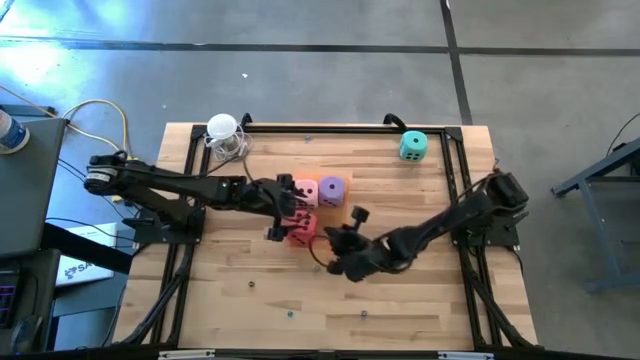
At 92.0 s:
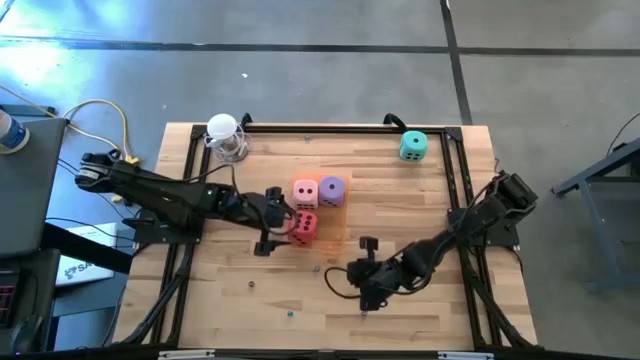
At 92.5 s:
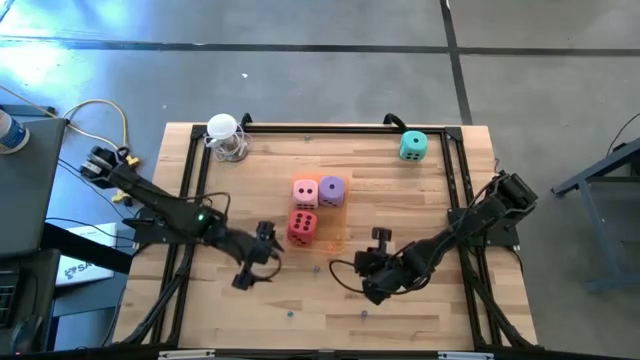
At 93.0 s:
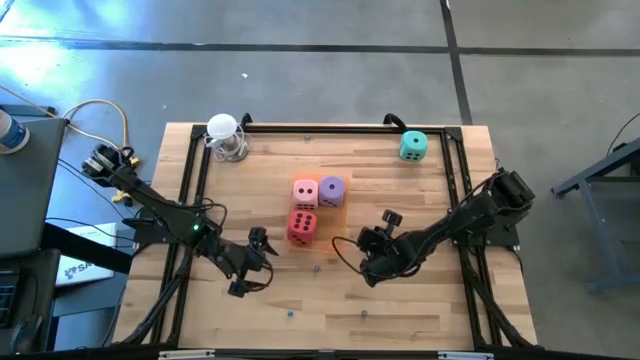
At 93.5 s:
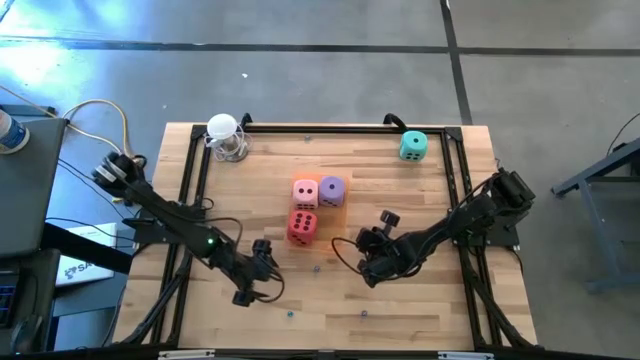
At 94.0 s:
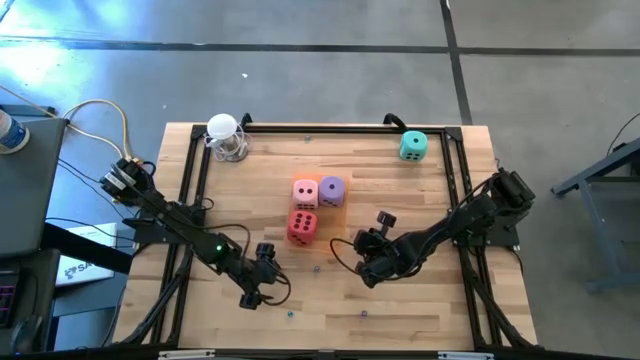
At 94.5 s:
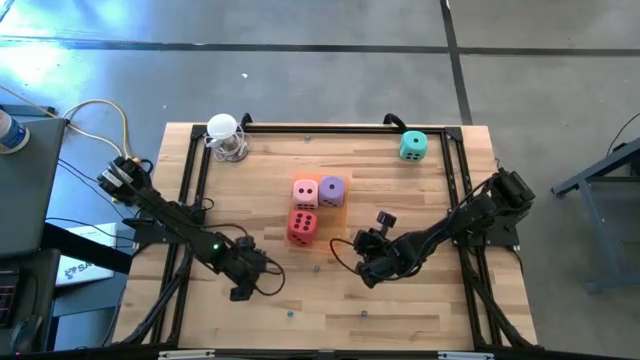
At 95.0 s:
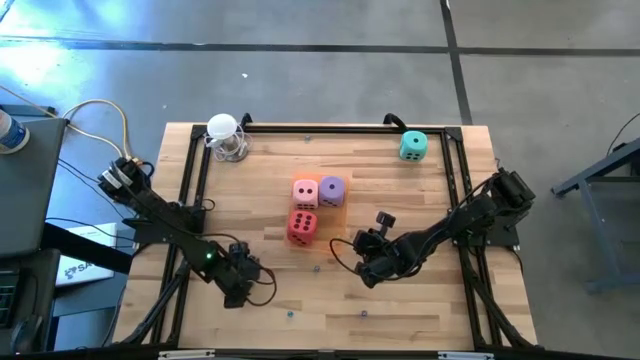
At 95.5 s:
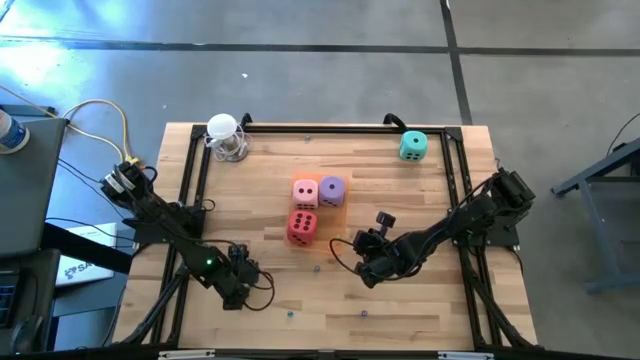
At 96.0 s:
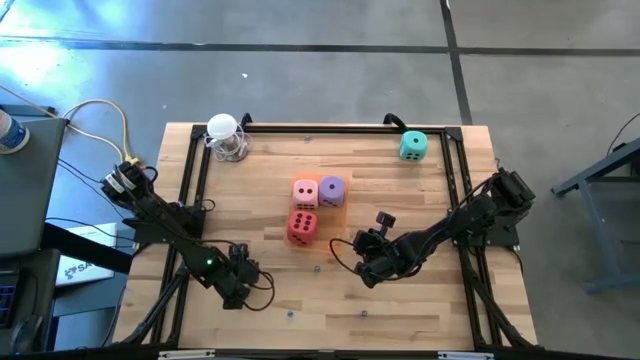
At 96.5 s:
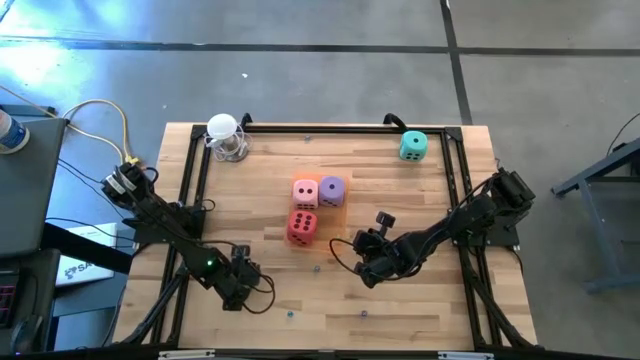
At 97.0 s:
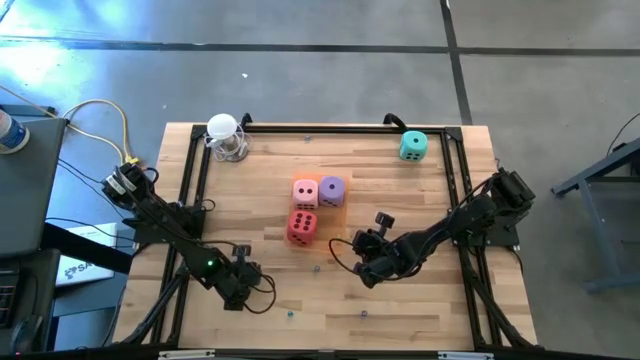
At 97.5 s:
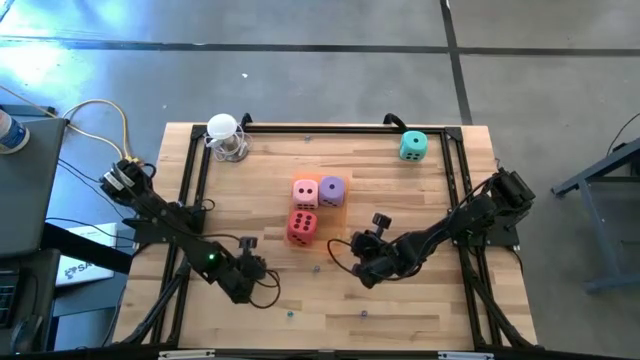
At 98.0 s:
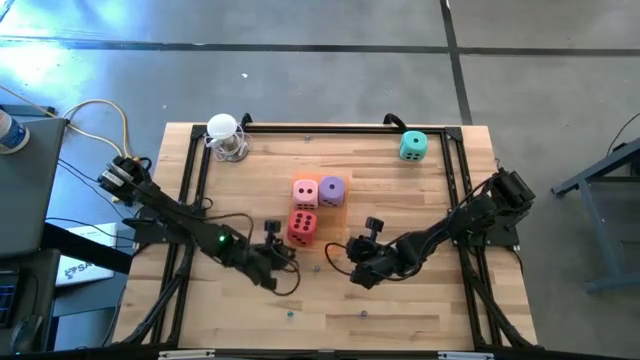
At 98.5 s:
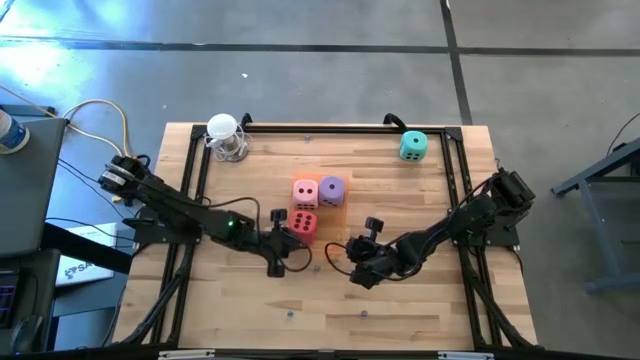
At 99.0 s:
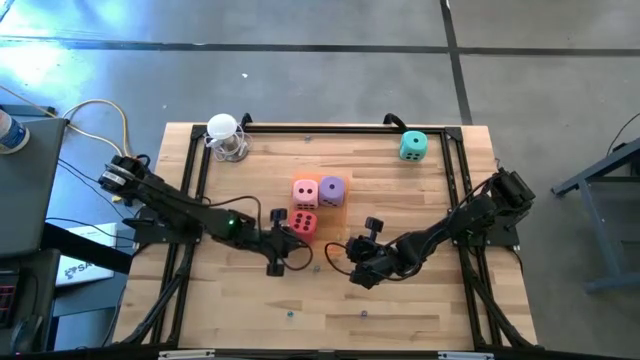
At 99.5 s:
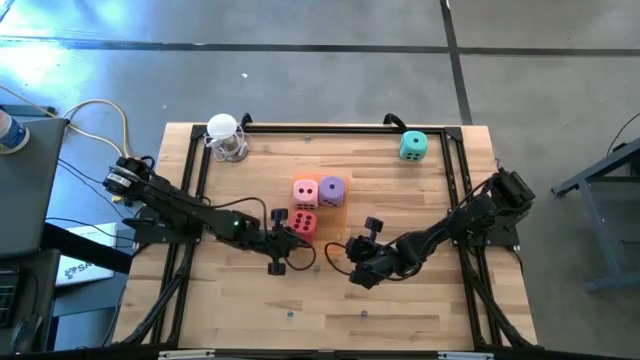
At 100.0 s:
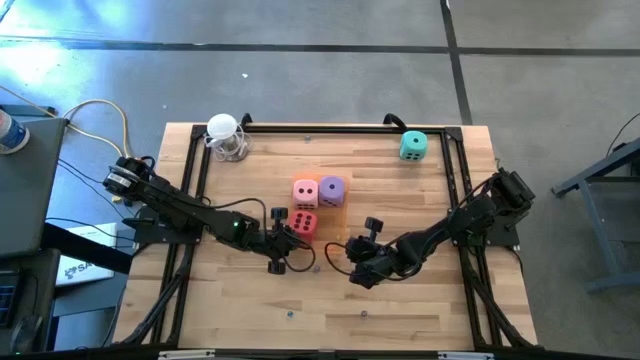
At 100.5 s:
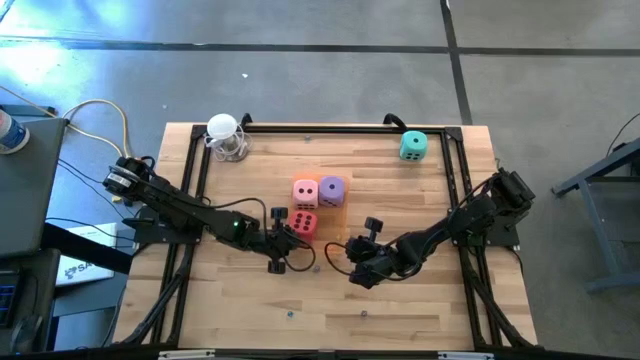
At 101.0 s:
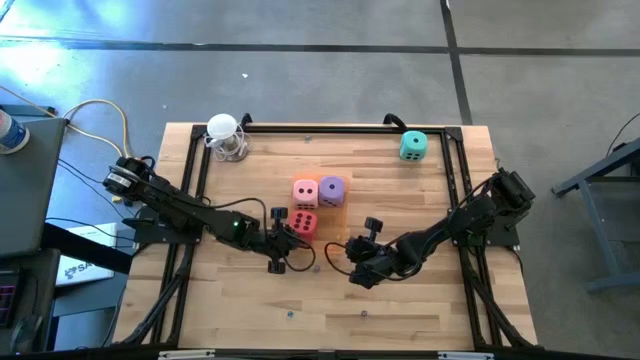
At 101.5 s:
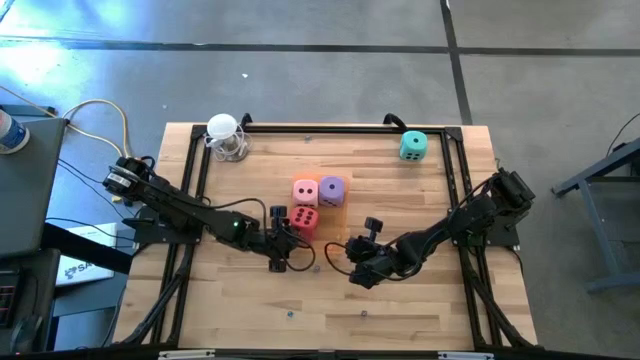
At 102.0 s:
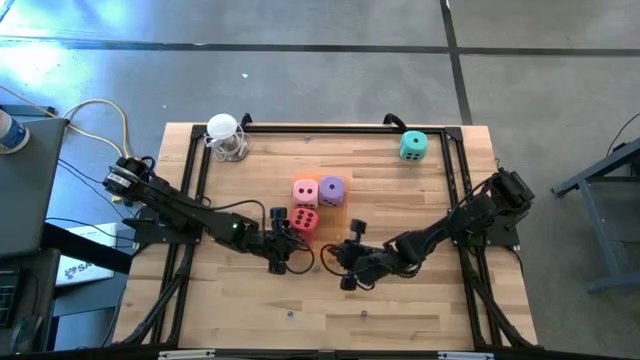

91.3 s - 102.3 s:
Task: Pick & Place Dice
Put the small black die into the orange bin

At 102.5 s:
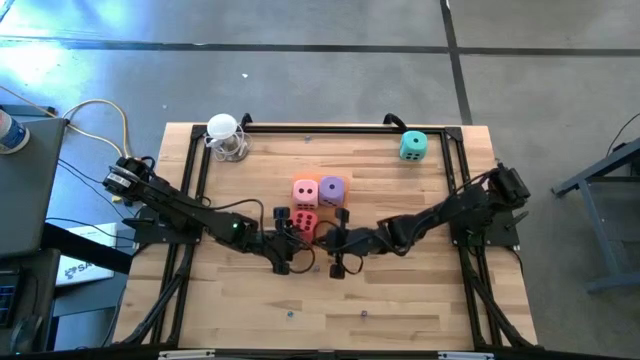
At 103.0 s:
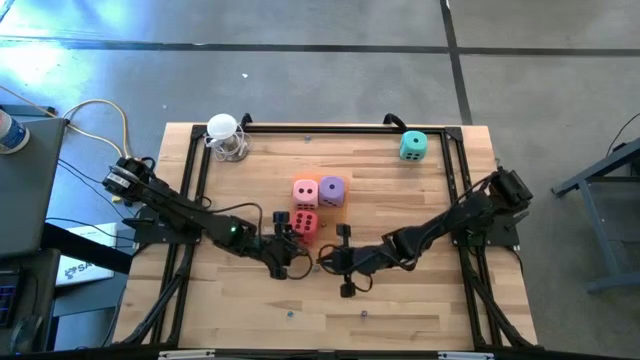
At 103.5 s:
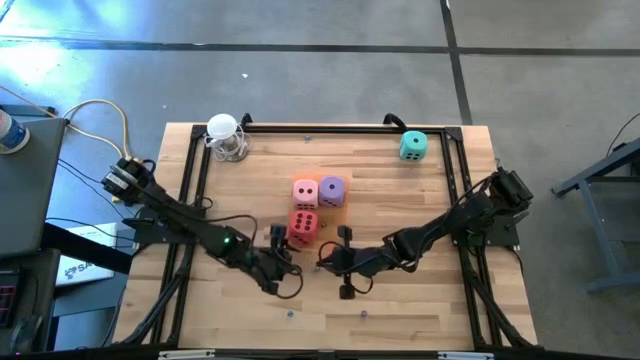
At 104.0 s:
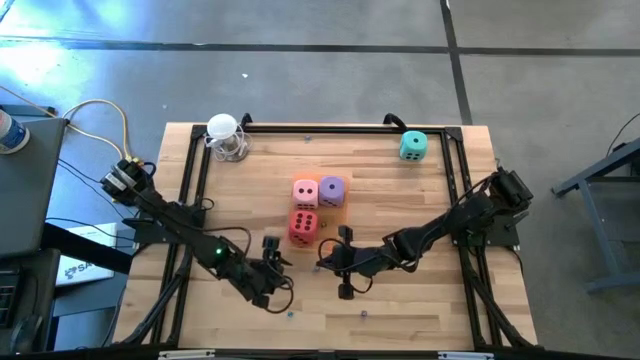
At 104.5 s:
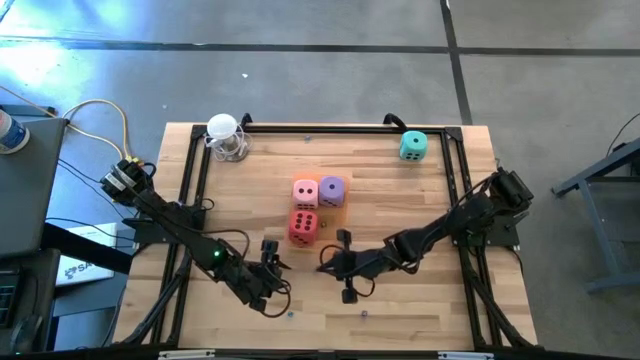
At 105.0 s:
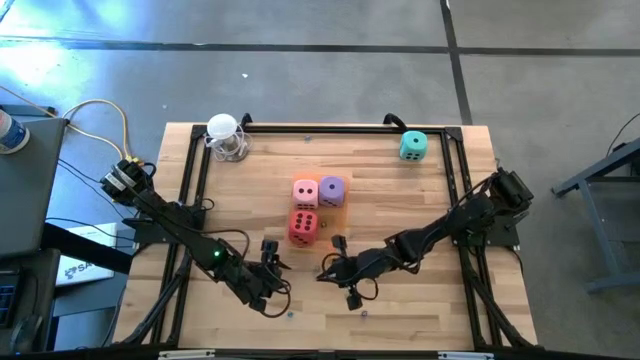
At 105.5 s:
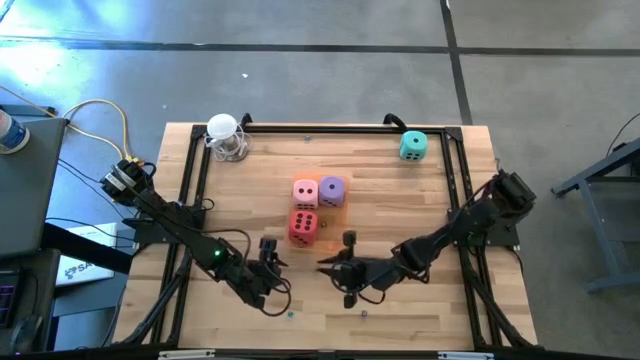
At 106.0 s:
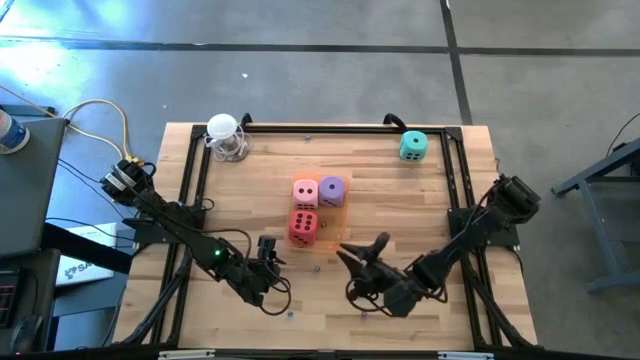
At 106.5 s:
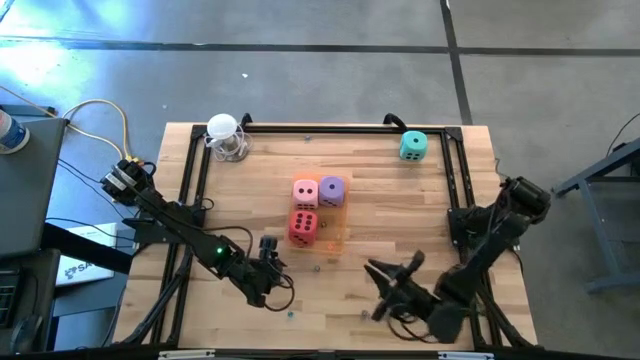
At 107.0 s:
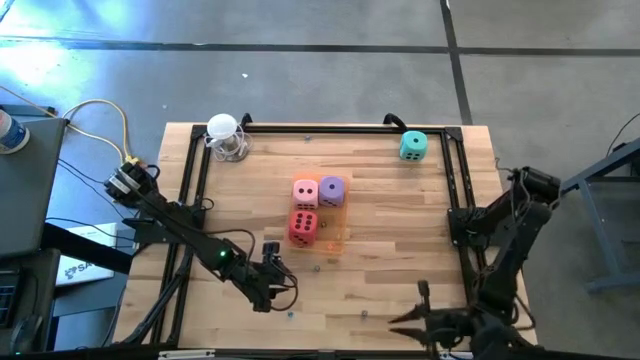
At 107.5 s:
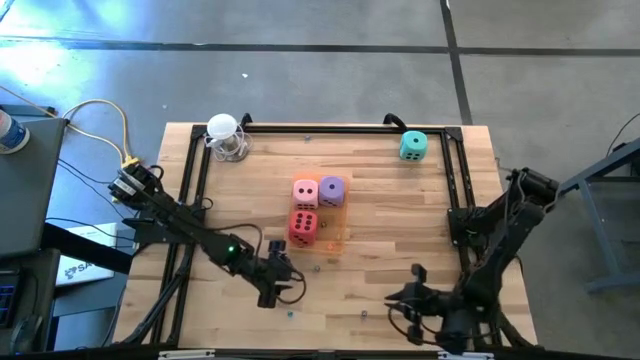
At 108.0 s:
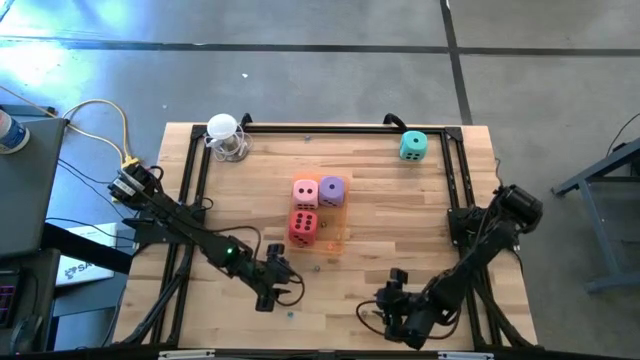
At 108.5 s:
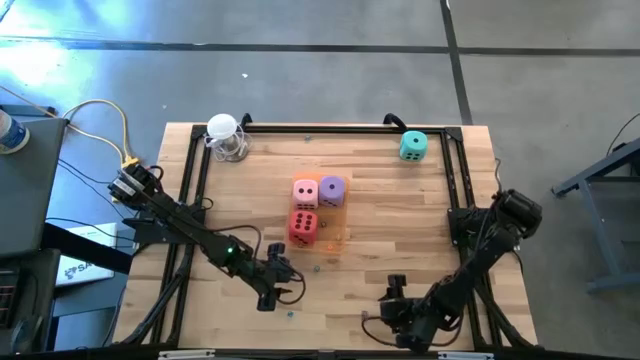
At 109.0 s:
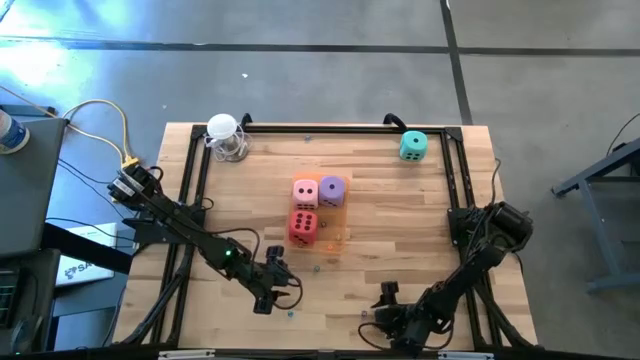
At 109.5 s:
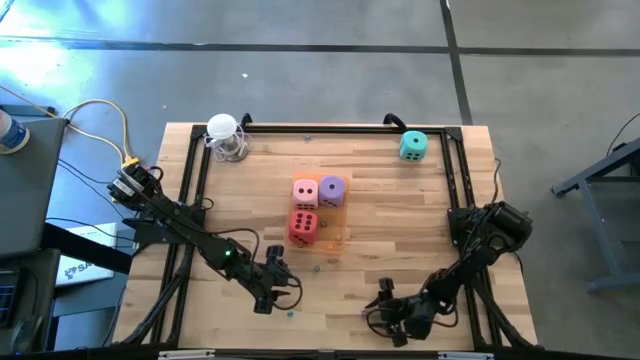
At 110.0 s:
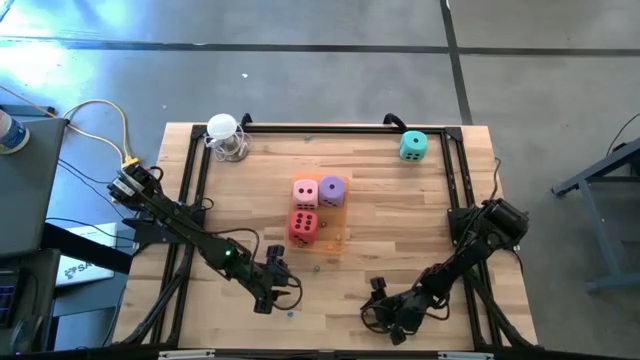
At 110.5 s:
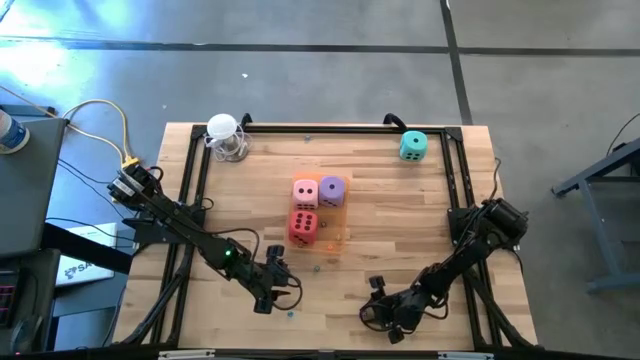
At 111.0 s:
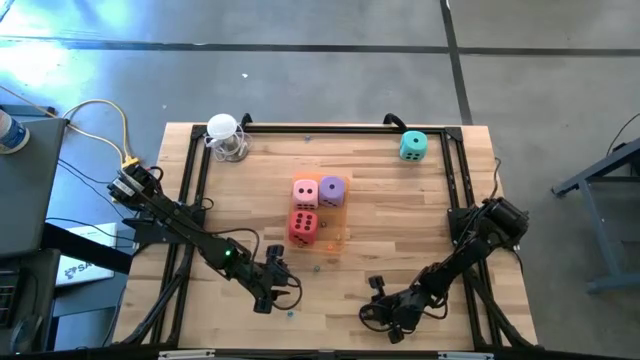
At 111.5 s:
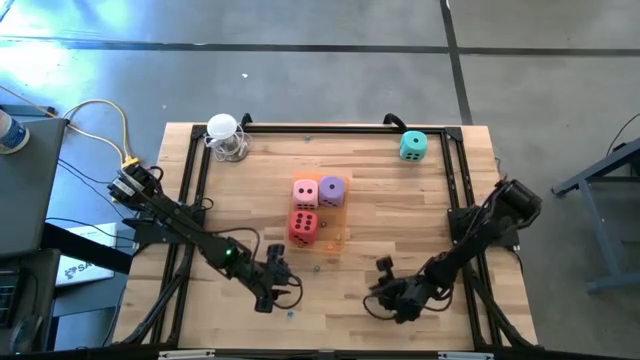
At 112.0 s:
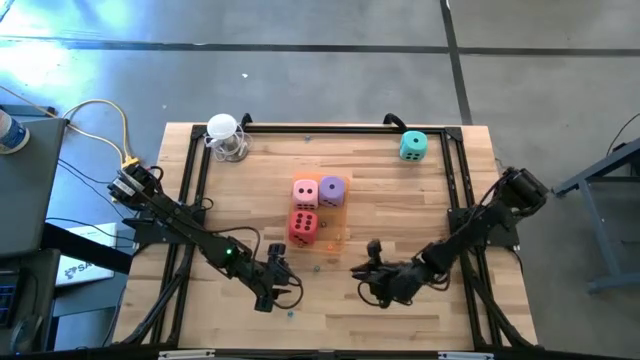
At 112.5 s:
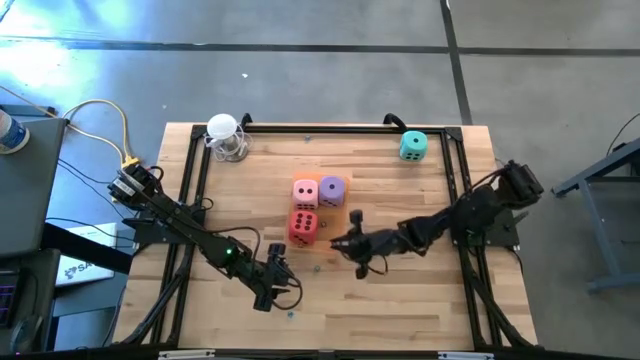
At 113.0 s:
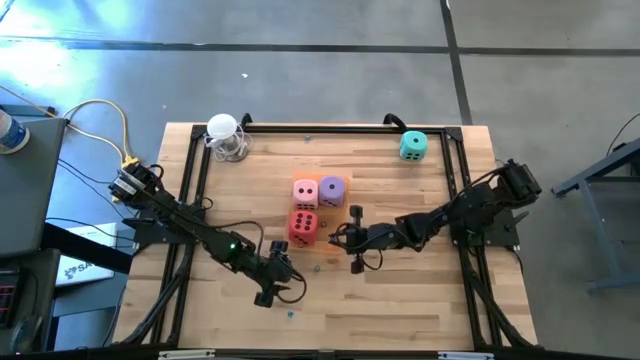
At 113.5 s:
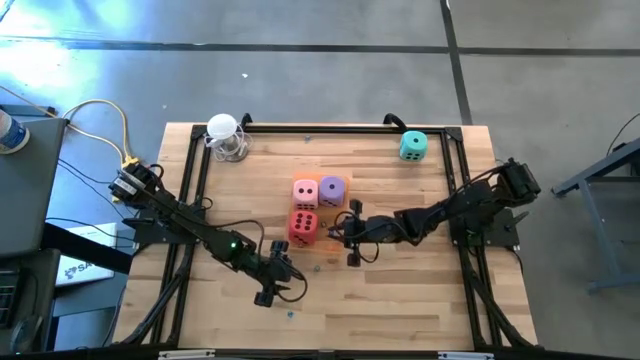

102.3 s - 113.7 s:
Put the small blue die into the orange bin
